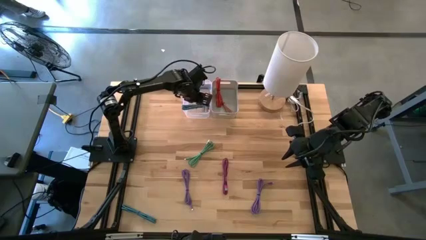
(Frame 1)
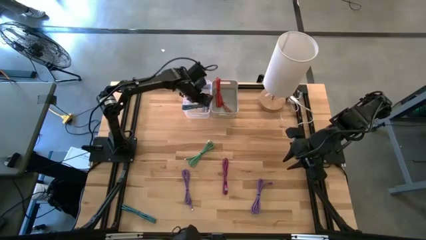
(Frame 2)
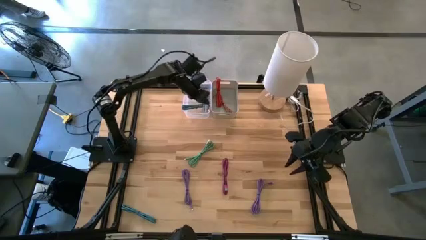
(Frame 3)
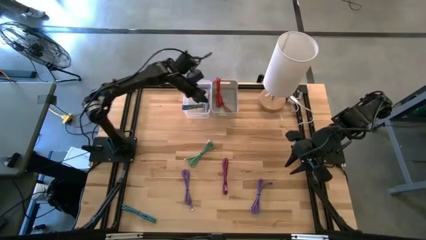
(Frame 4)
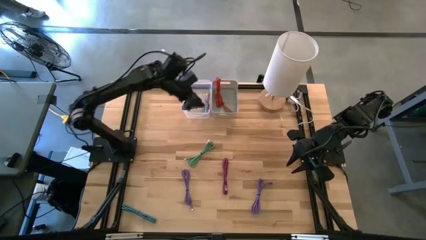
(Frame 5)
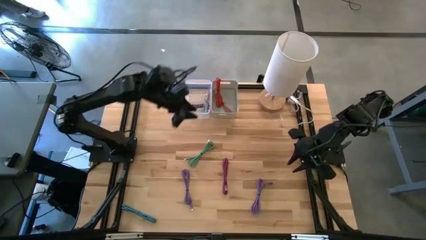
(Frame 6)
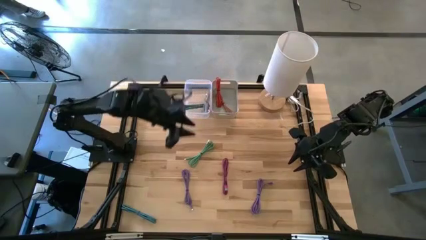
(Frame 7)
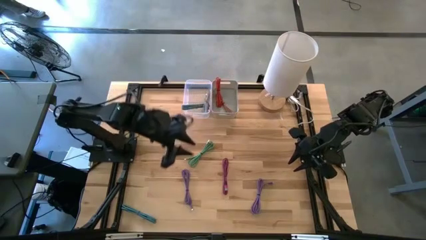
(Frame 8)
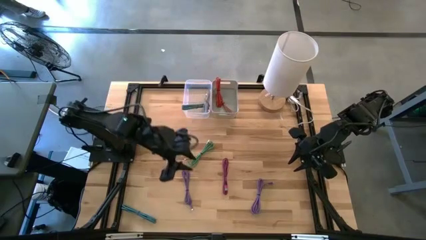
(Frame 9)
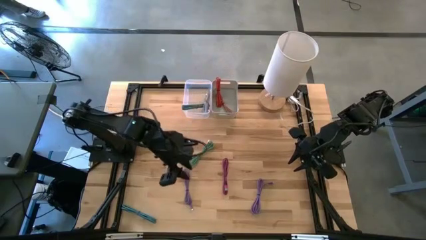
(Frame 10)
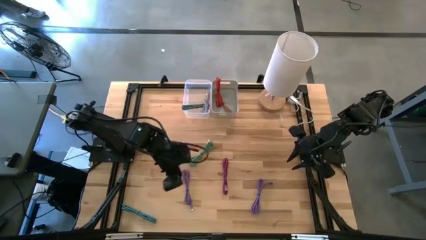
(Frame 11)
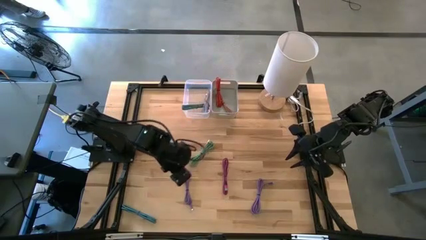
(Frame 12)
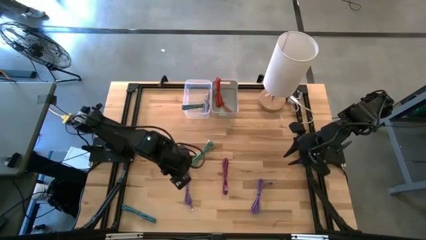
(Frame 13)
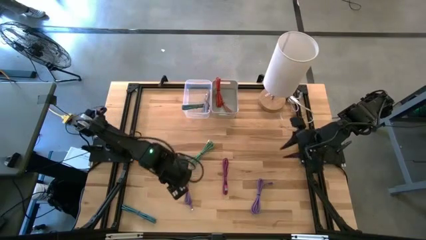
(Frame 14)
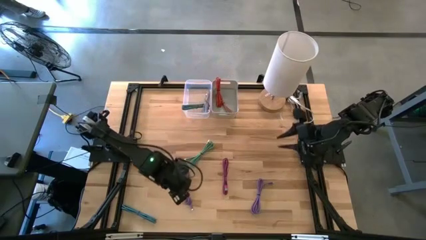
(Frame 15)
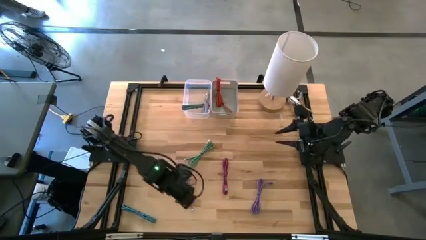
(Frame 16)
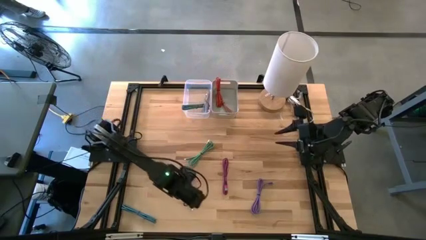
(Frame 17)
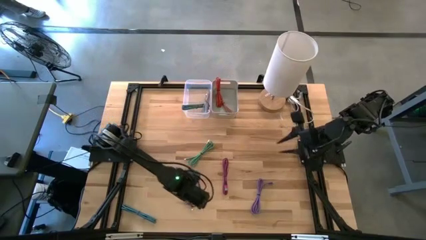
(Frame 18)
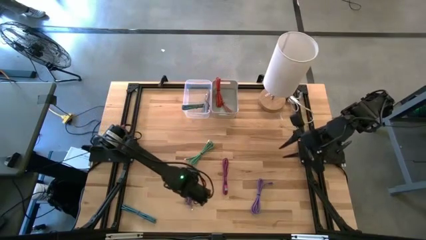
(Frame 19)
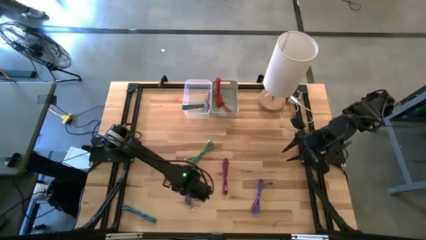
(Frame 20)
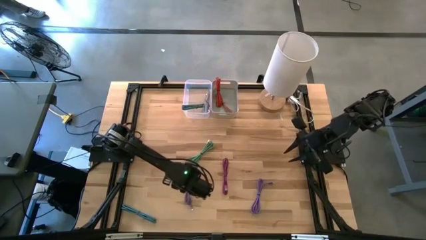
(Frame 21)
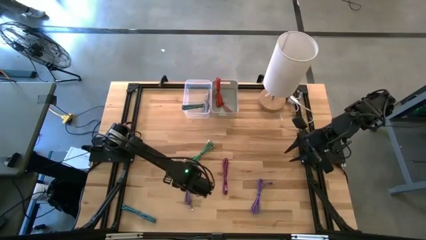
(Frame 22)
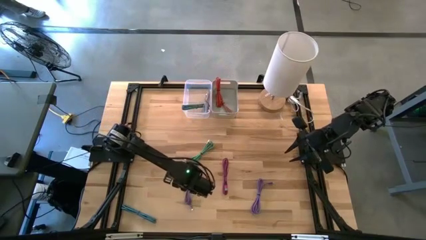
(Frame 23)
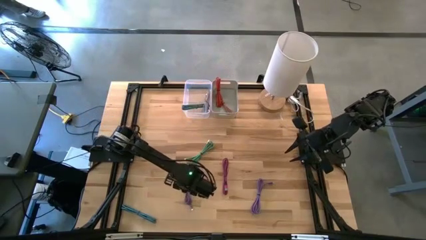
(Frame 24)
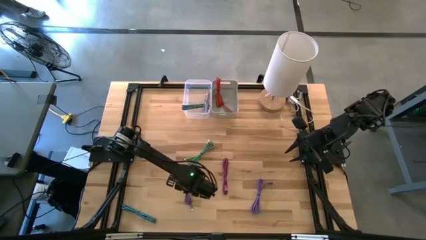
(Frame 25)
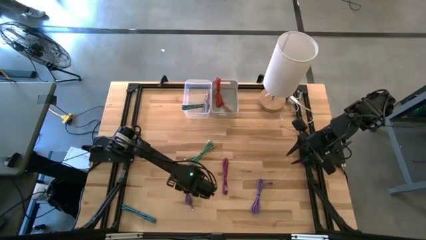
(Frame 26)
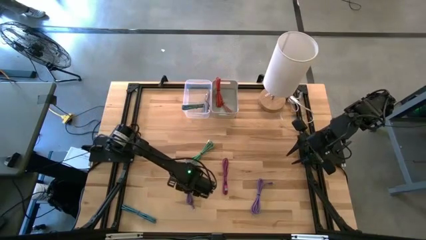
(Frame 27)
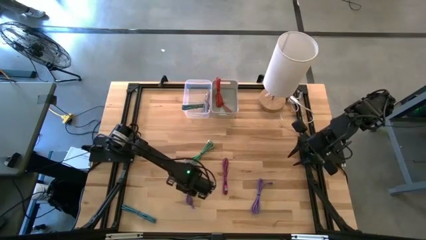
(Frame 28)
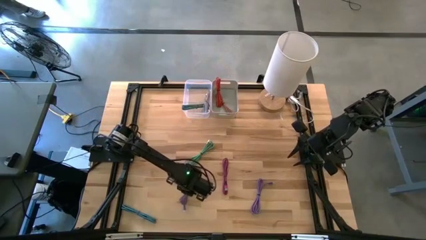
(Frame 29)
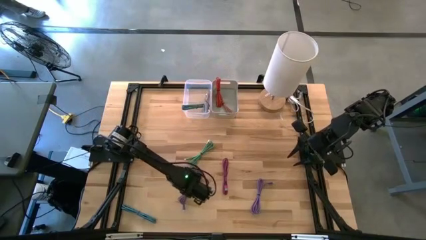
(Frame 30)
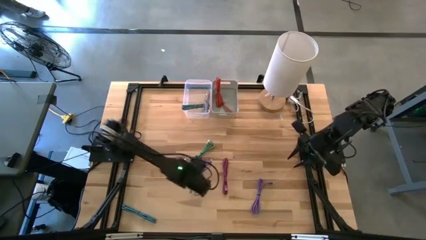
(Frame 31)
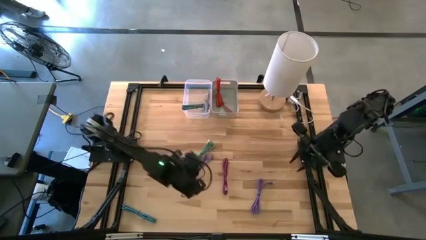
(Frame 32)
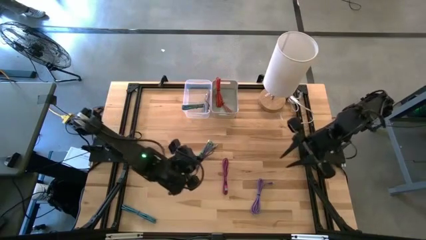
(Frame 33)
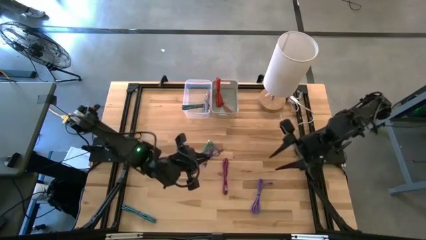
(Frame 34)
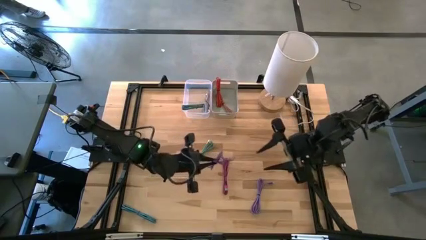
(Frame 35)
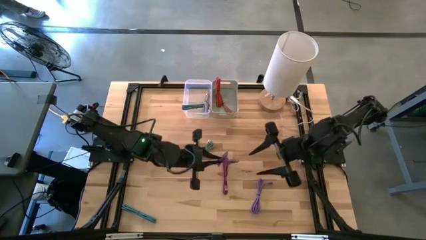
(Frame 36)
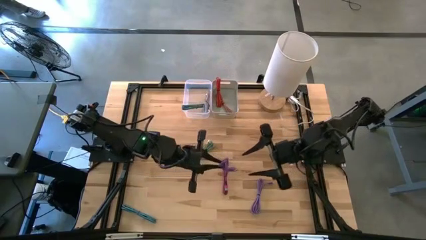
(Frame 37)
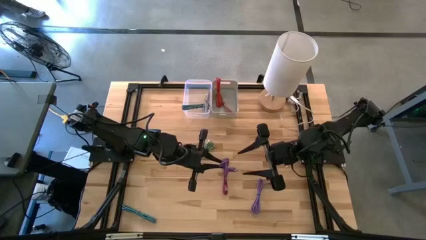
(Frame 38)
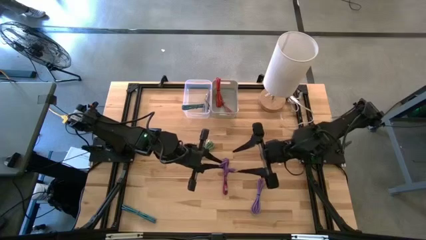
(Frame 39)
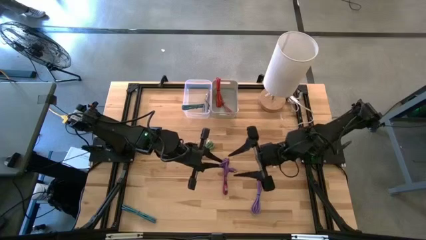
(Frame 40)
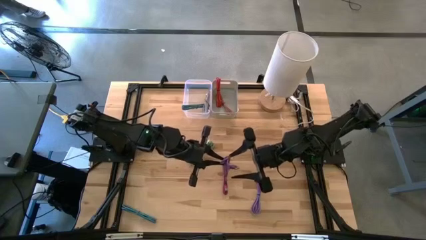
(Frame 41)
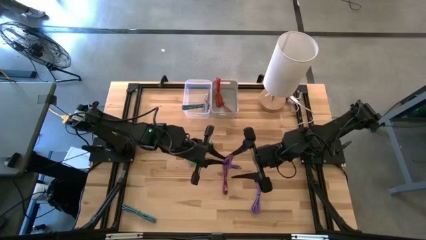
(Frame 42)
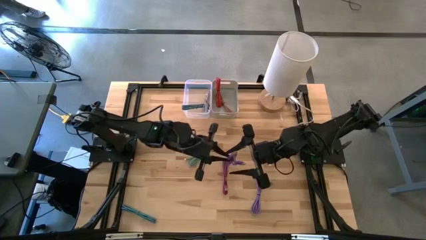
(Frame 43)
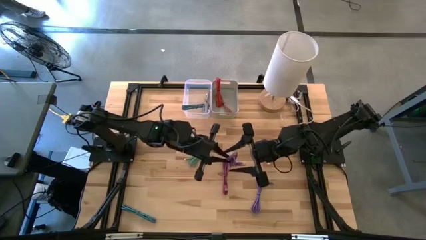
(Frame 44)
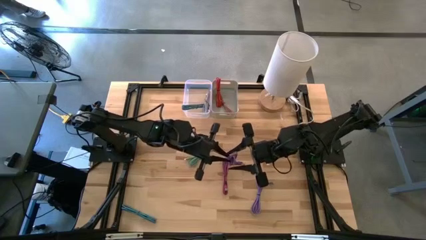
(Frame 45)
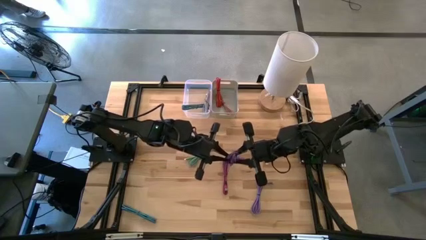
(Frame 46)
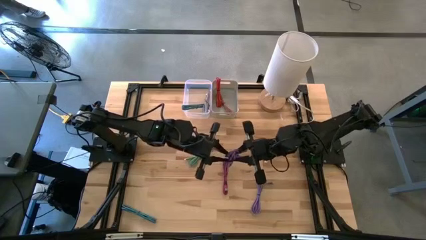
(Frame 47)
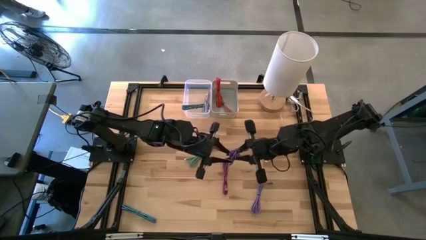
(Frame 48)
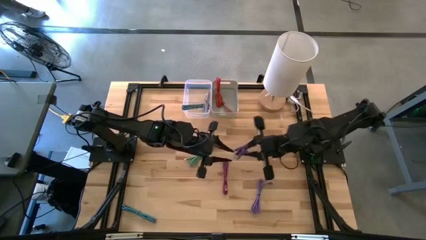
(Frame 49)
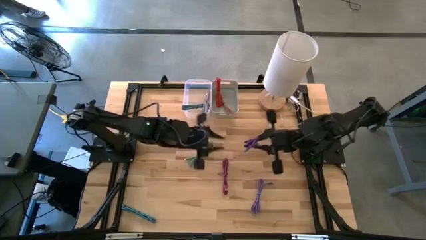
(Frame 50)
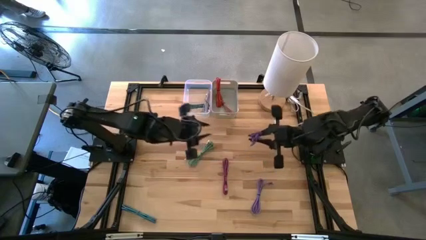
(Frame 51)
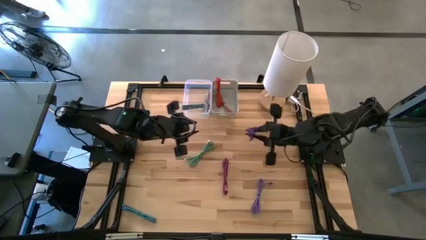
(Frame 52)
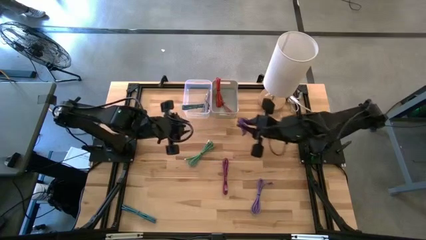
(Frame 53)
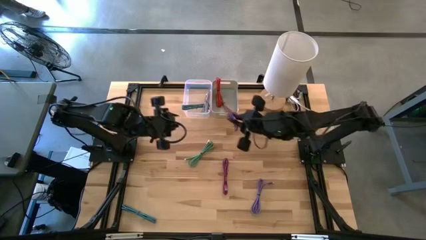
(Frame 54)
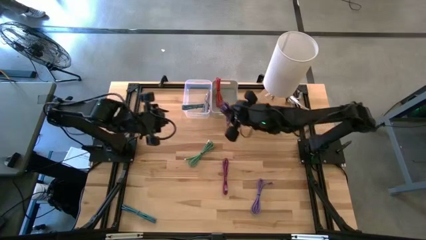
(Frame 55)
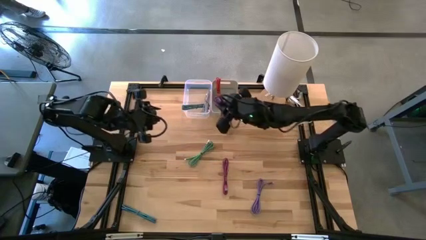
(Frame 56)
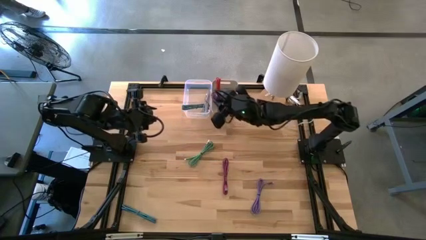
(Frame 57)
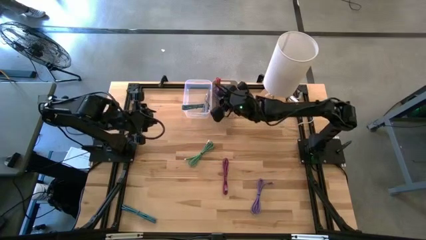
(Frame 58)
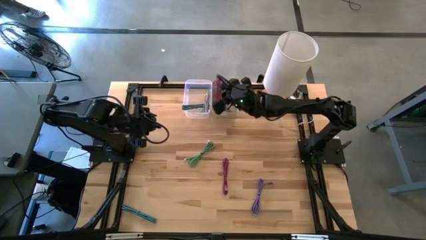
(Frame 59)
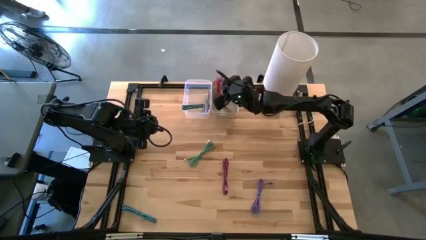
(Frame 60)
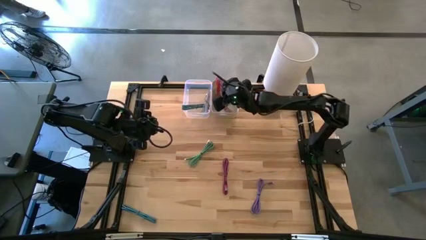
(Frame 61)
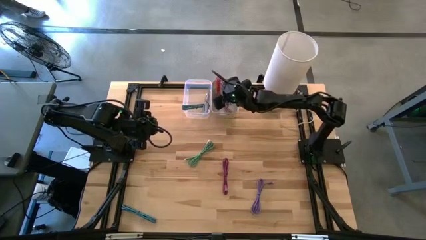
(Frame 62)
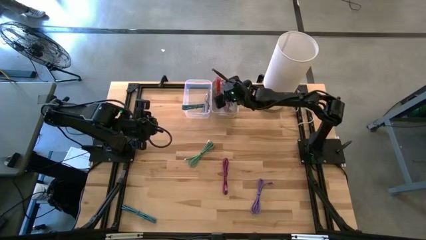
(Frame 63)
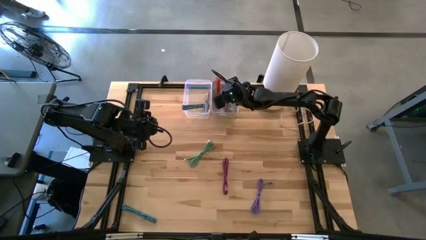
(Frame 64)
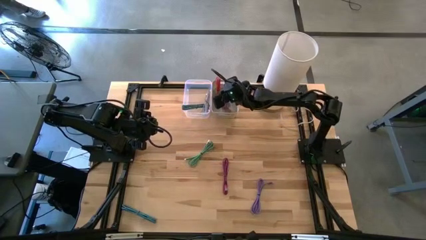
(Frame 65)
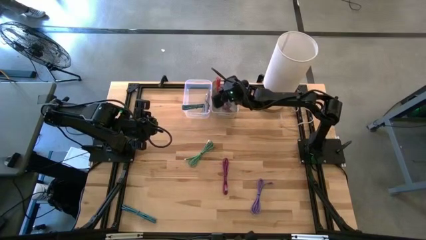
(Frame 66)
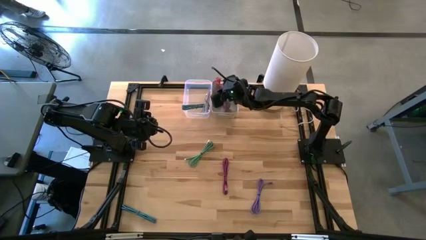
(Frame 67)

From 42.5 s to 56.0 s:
Task: Pick & Place USB Port
Put the left purple charger cable into the gray bin
